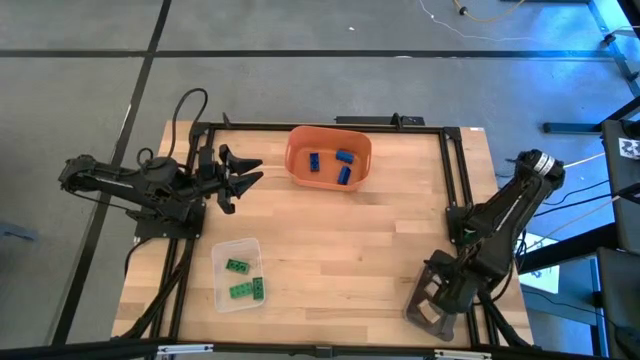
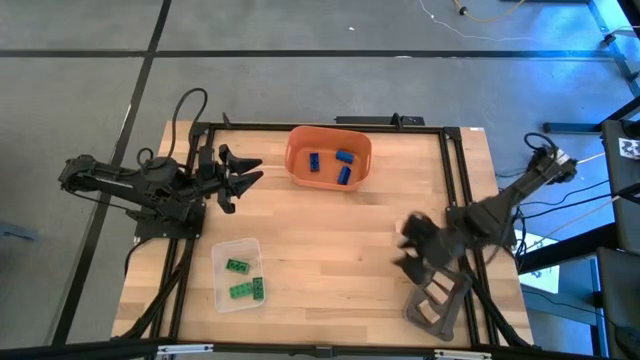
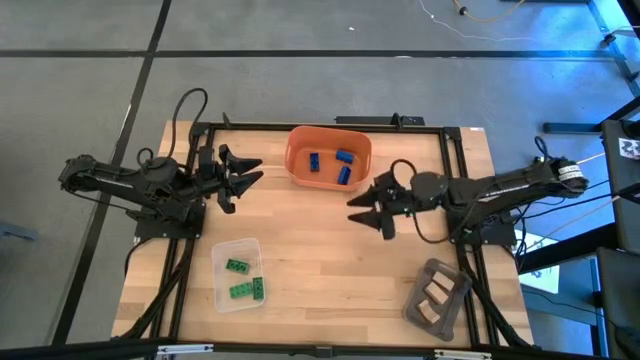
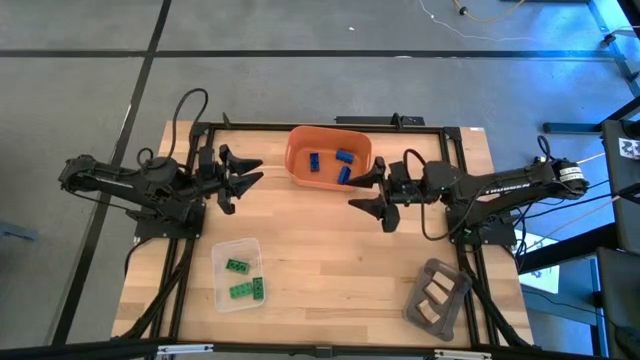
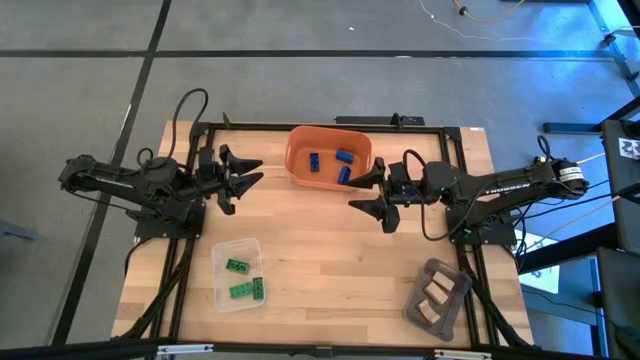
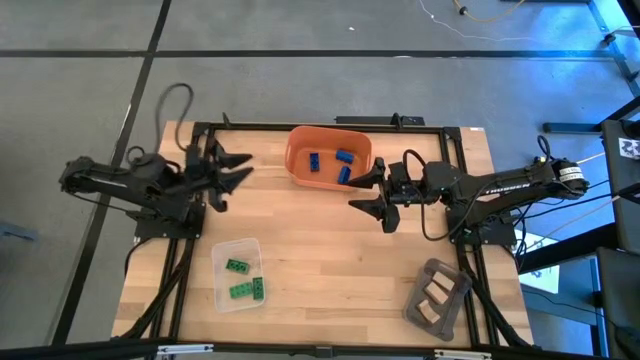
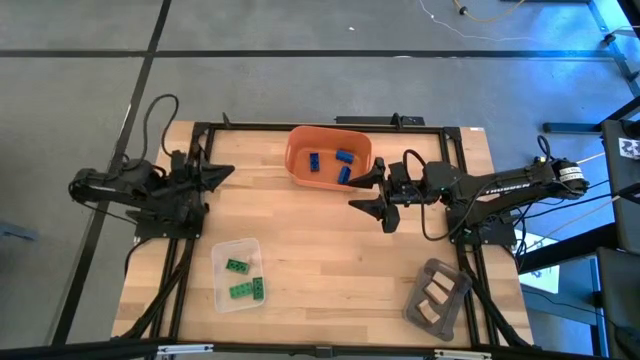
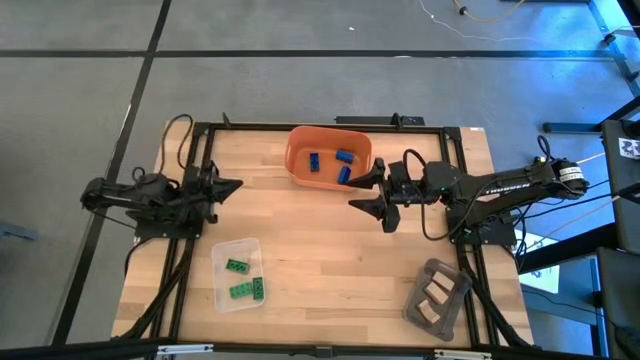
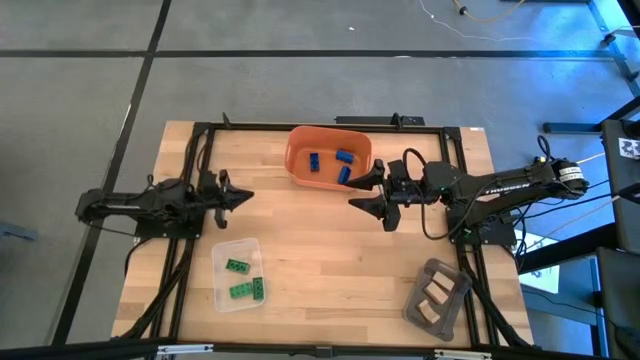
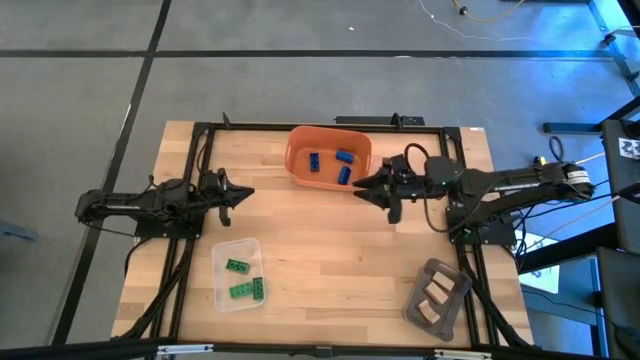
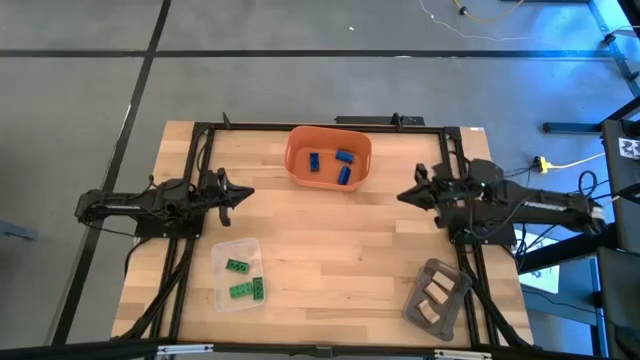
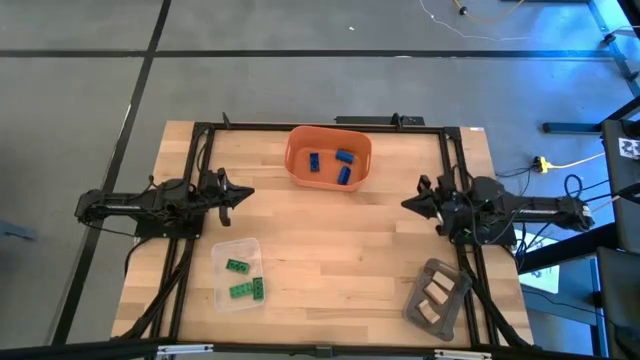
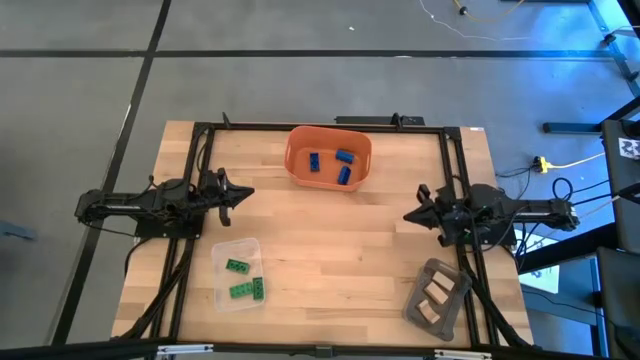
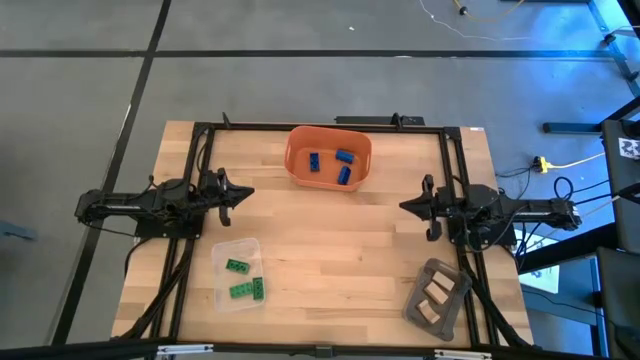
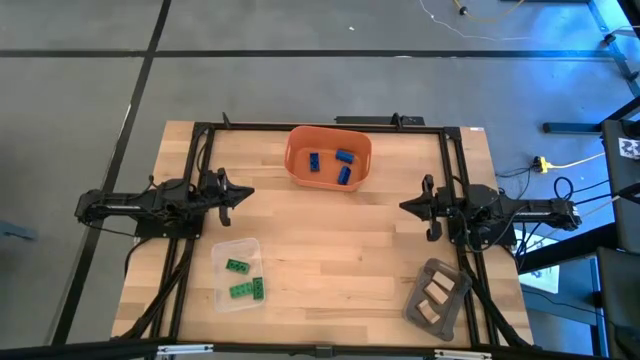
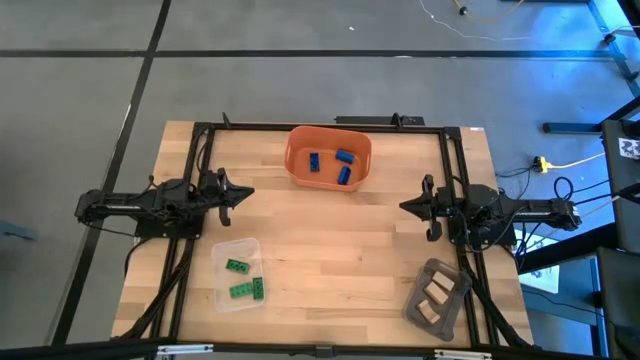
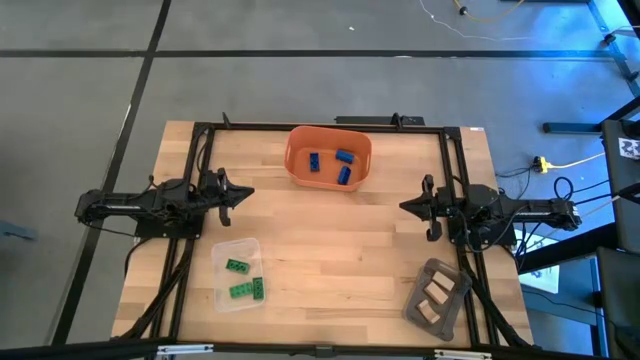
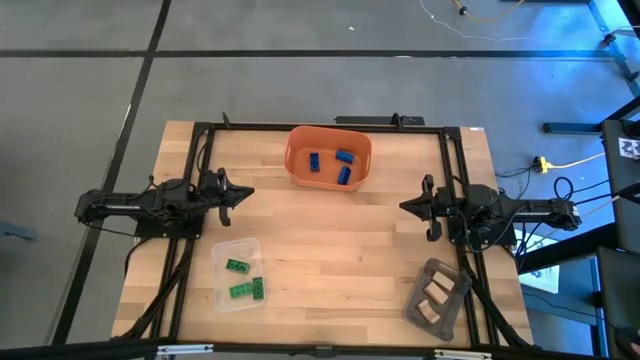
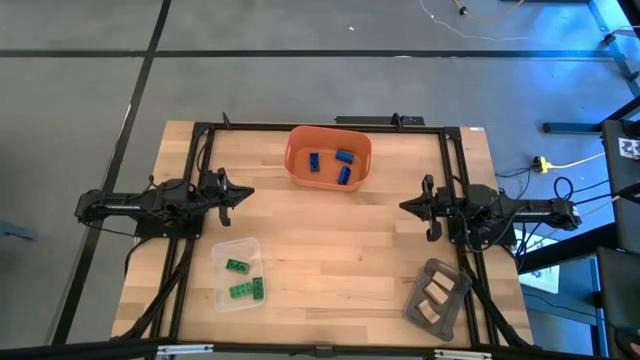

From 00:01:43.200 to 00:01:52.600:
Task: Sort & place blocks by color
Return to Home Position

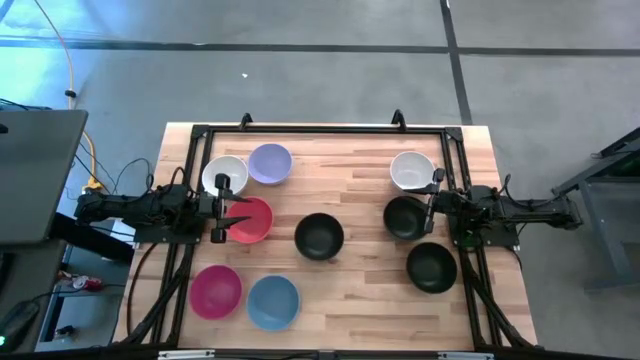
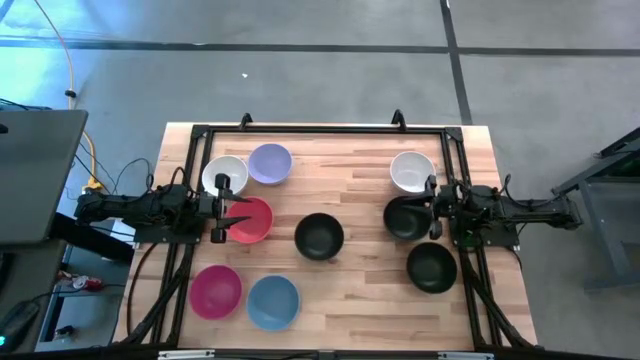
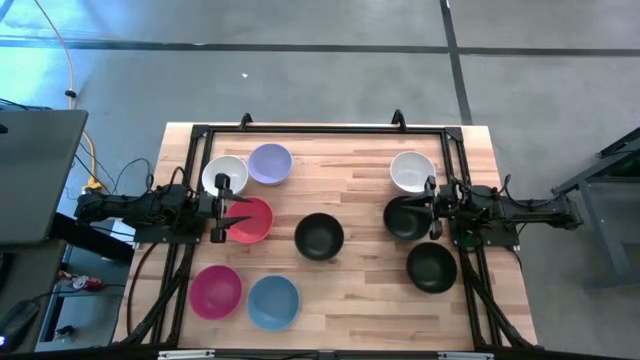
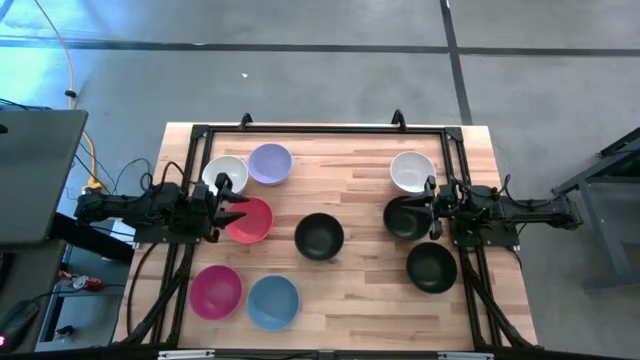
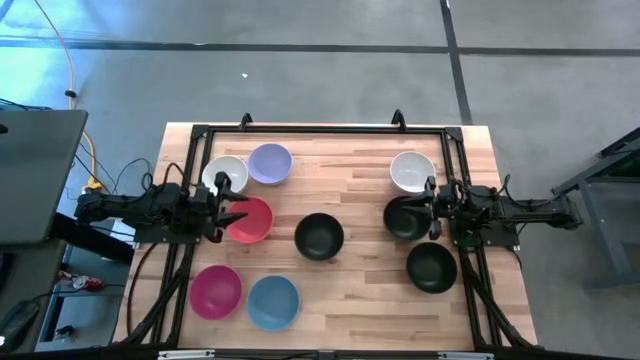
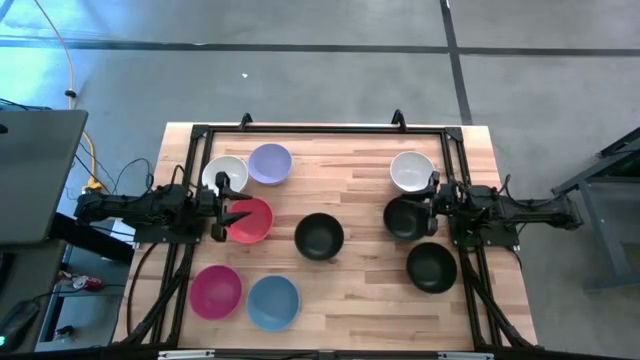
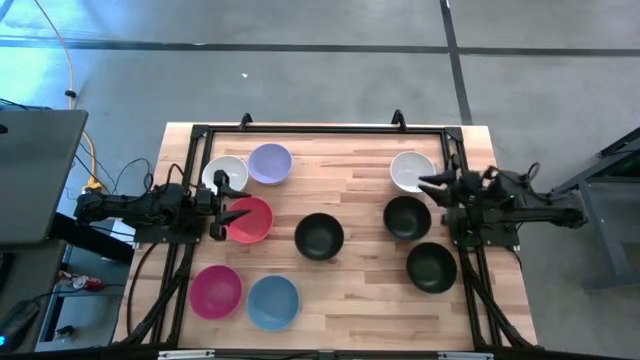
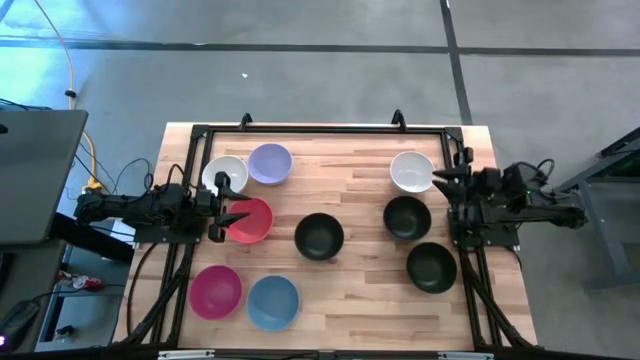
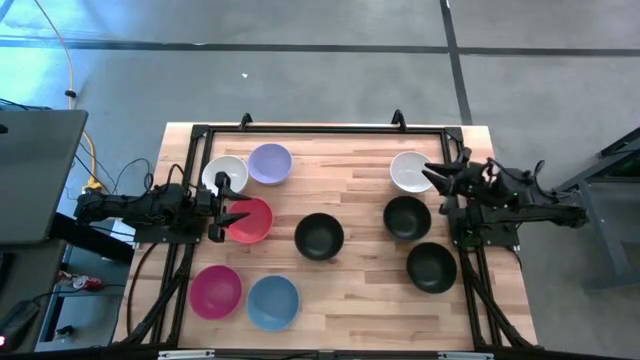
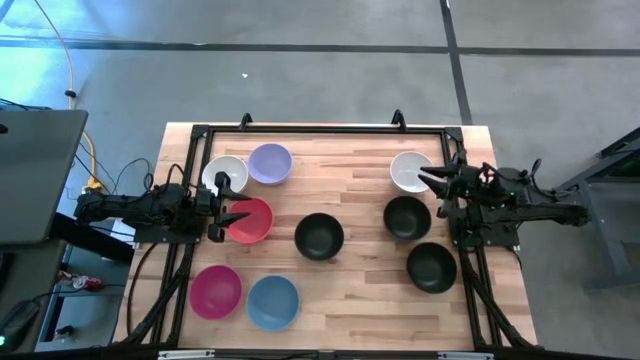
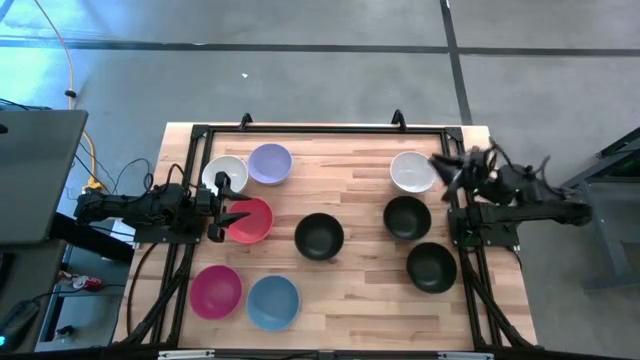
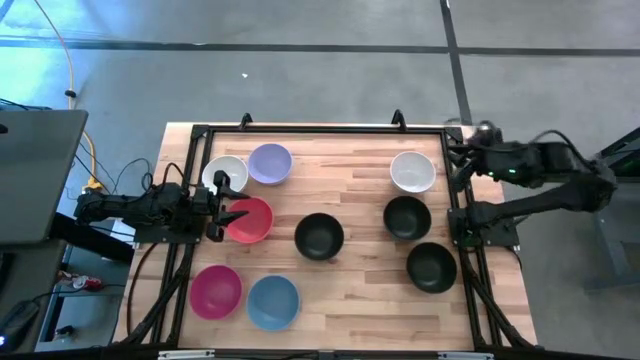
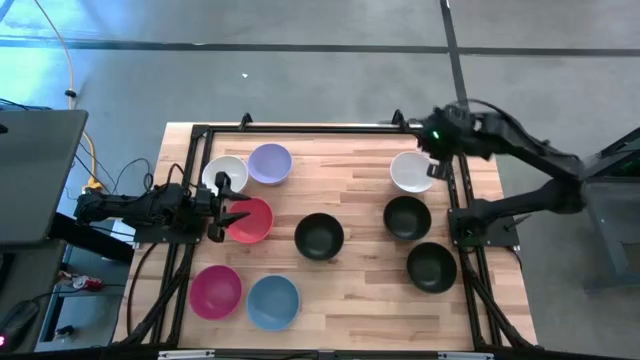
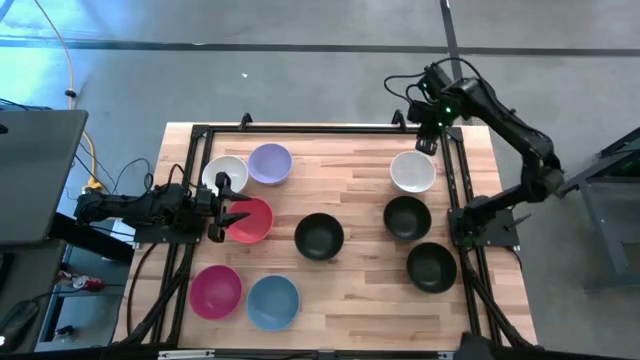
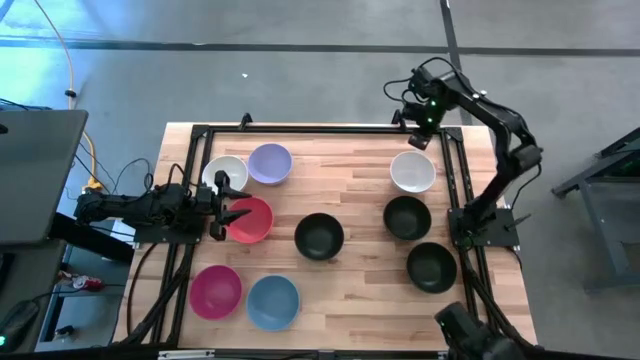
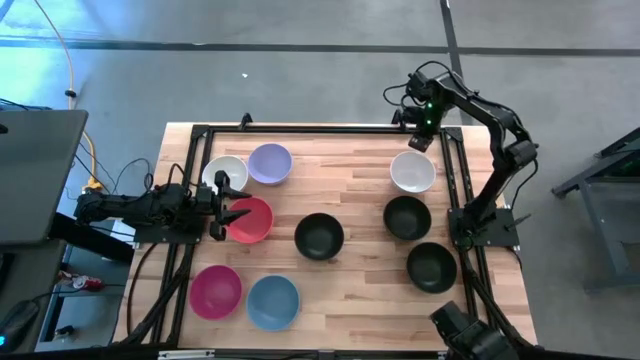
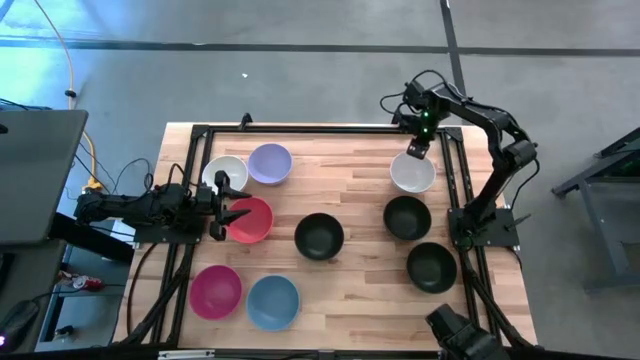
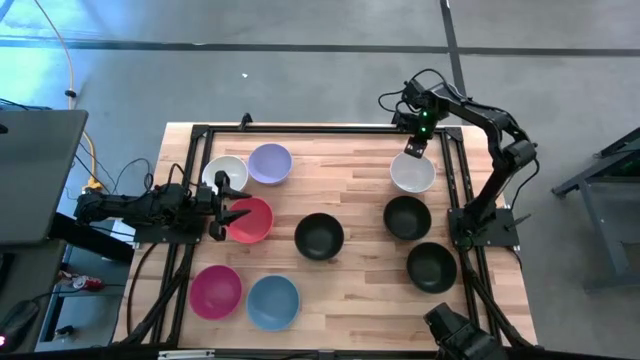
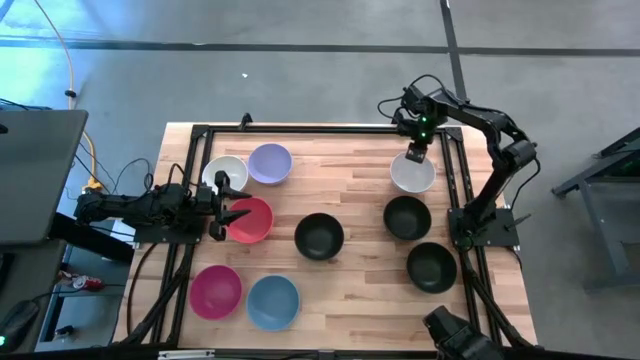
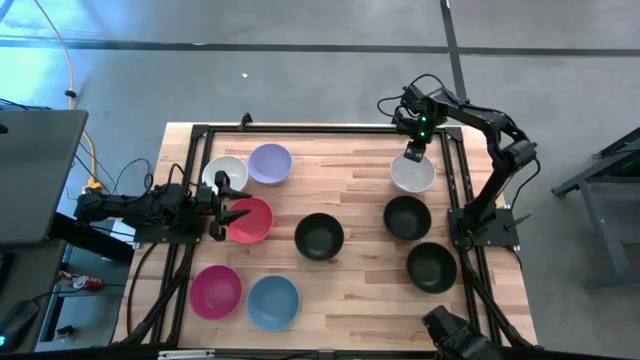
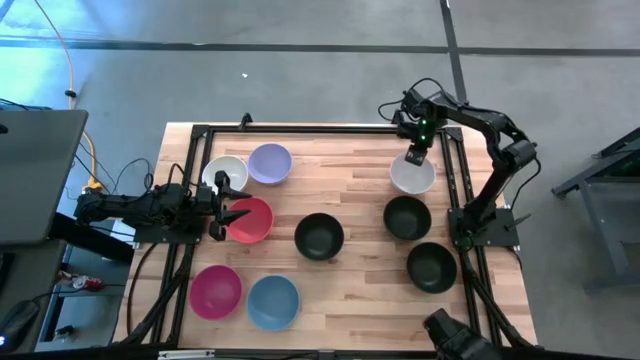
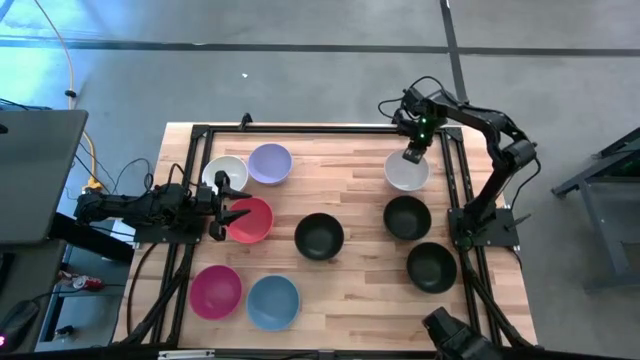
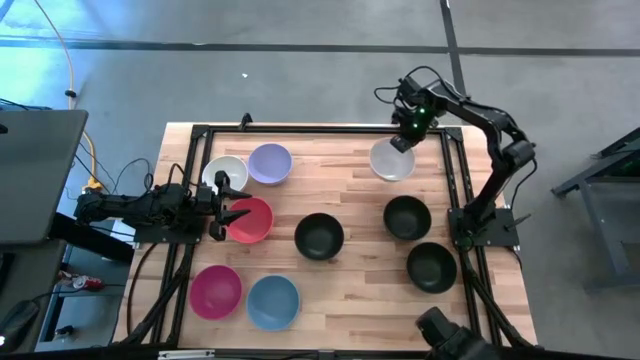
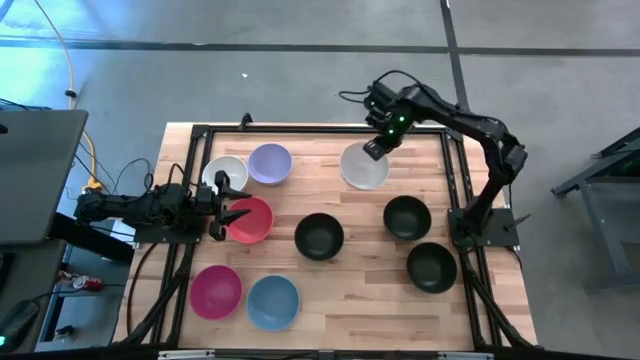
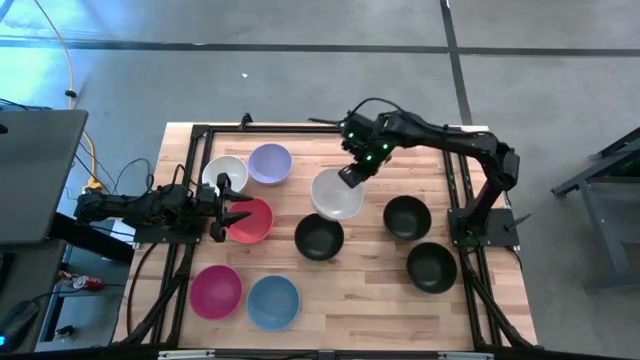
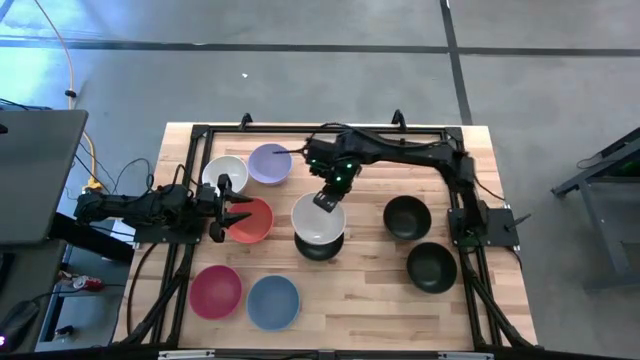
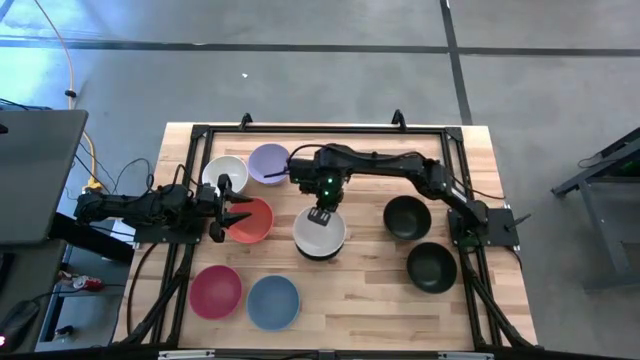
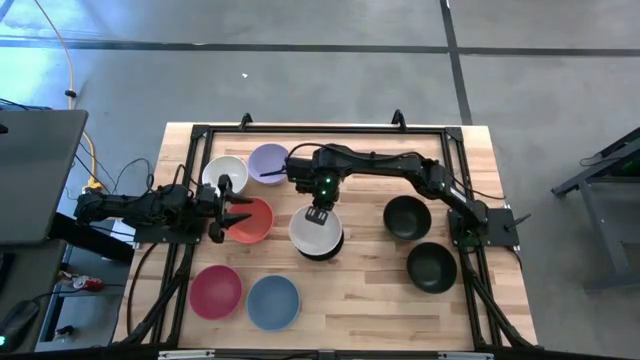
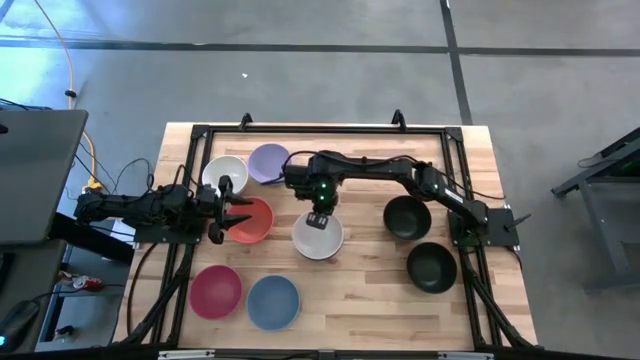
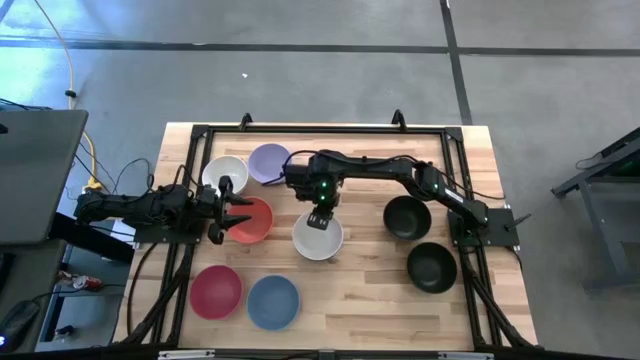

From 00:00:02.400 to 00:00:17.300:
Task: Nest bowls inside each other
Stack the right white bowl on top of the black bowl
